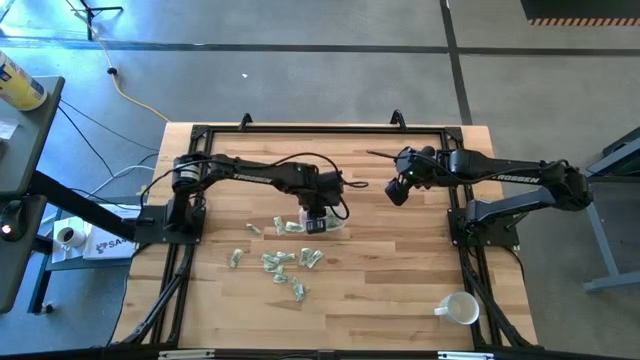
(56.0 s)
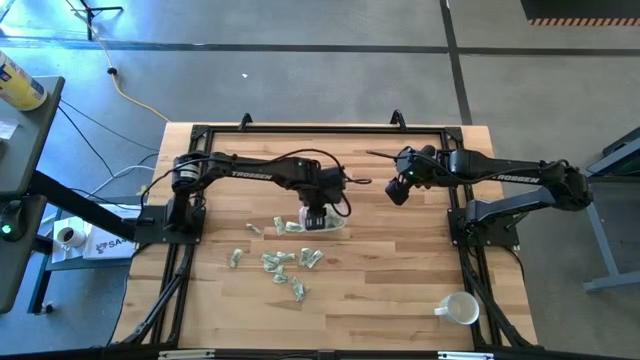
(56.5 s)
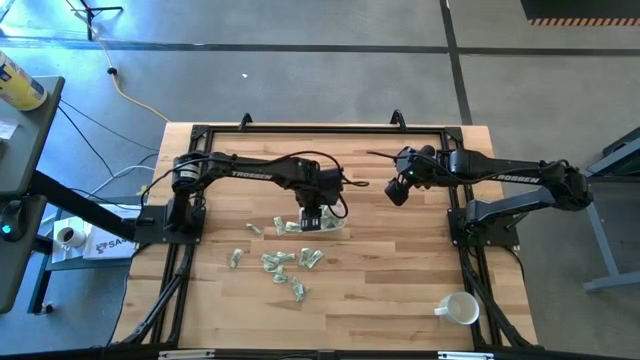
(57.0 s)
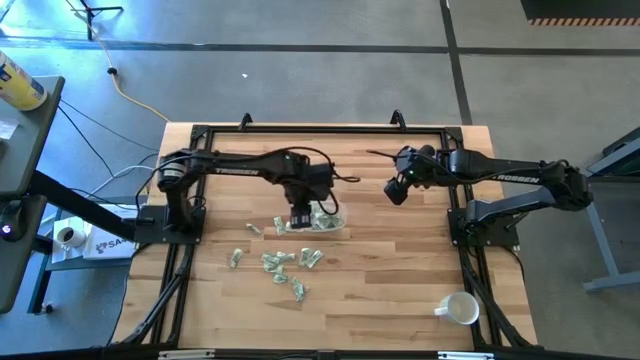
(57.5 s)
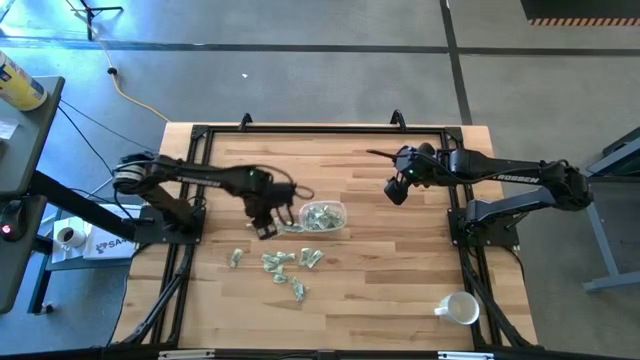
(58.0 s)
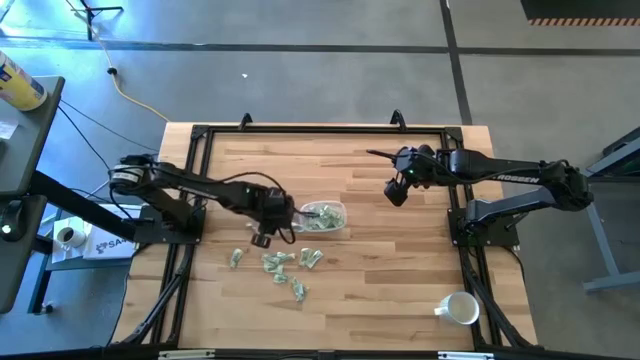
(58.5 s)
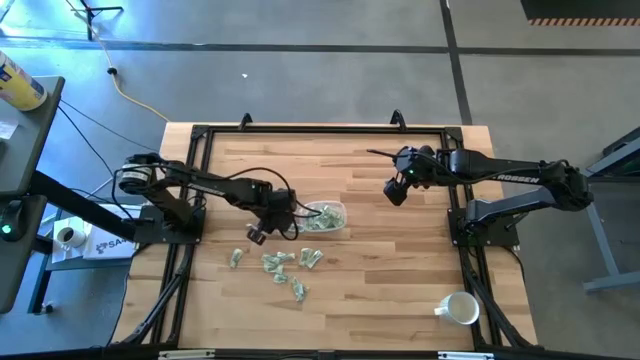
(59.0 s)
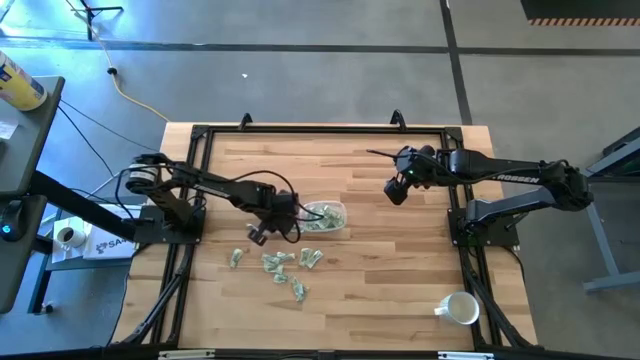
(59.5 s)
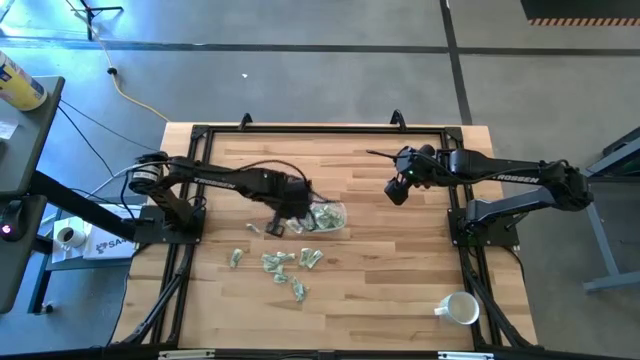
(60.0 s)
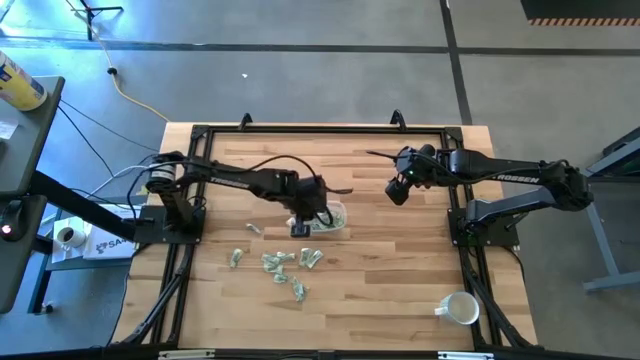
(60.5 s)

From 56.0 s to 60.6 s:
Task: Pick and place Stevia / Truvia into bins
Put the stevia packet into the transparent container

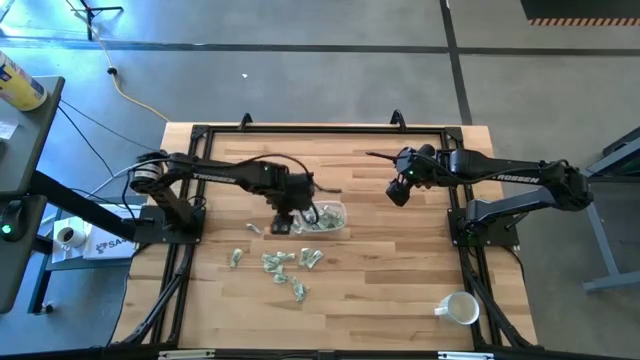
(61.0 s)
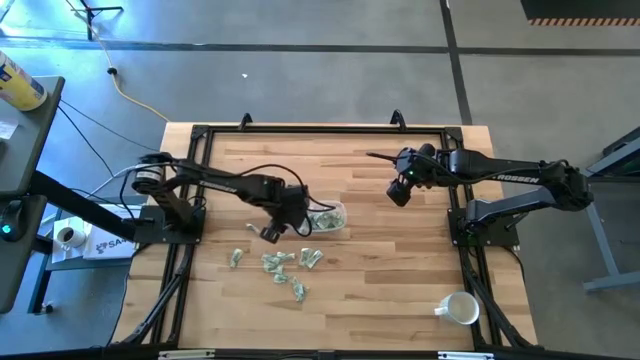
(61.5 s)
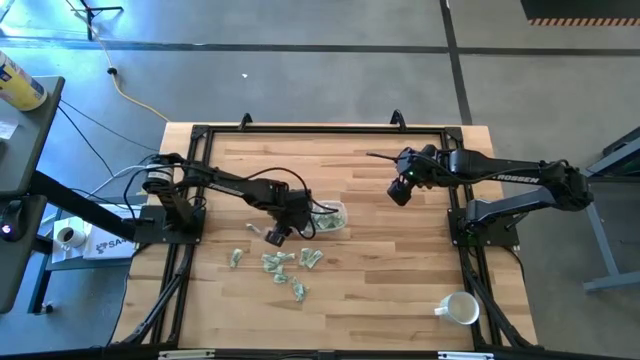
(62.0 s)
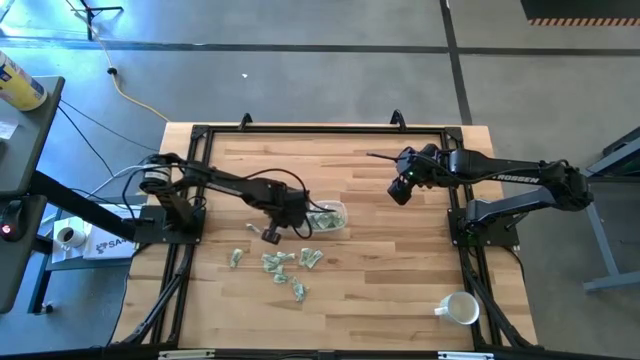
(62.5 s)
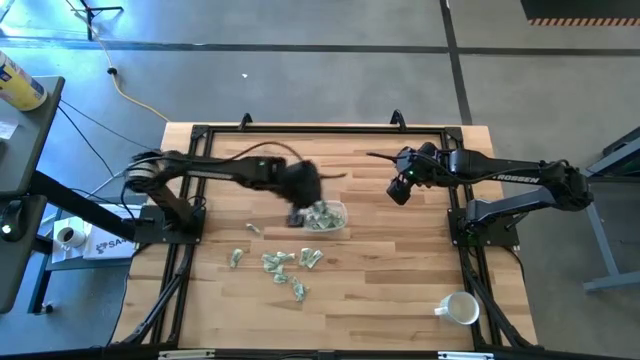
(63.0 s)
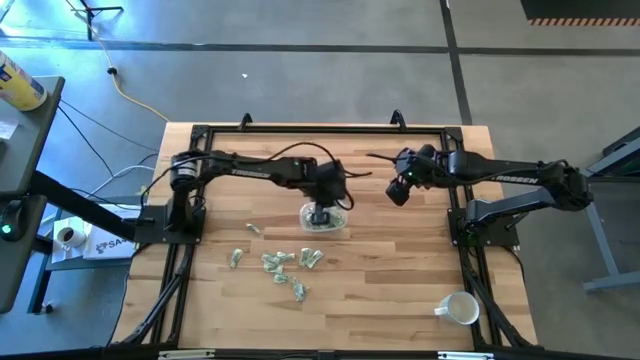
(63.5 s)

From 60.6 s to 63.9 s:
Put the stevia packet into the transparent container

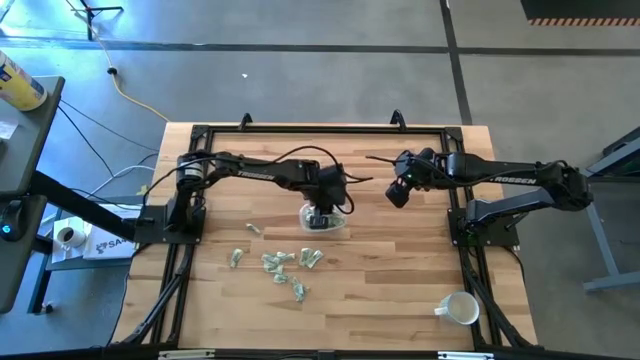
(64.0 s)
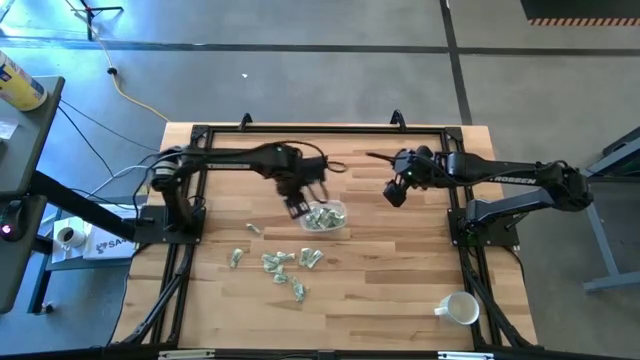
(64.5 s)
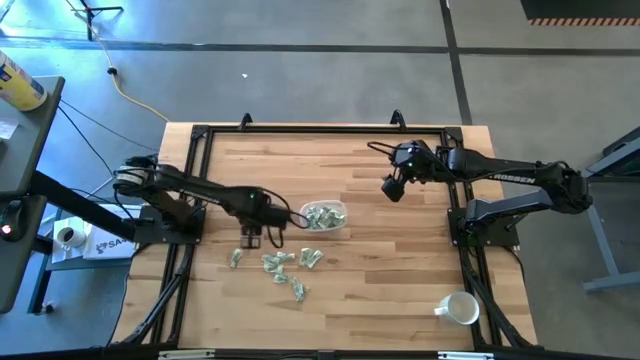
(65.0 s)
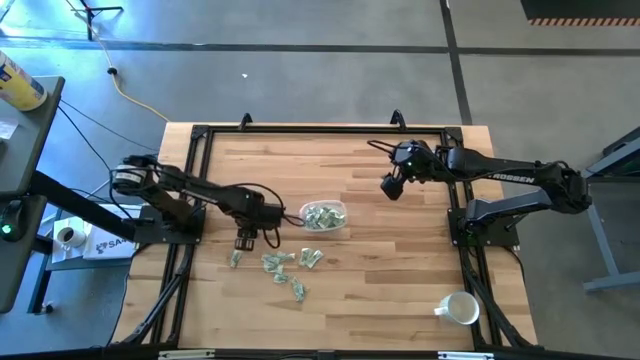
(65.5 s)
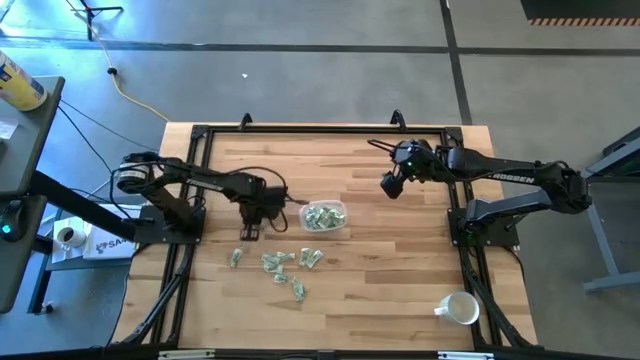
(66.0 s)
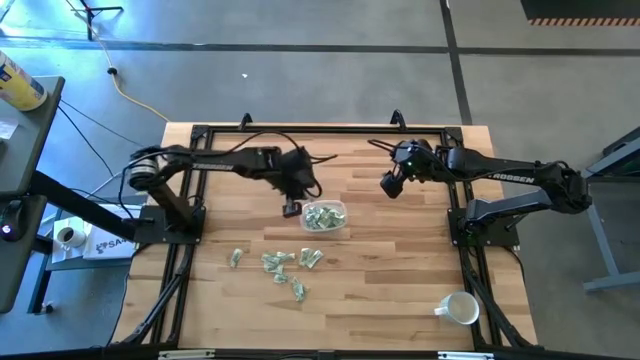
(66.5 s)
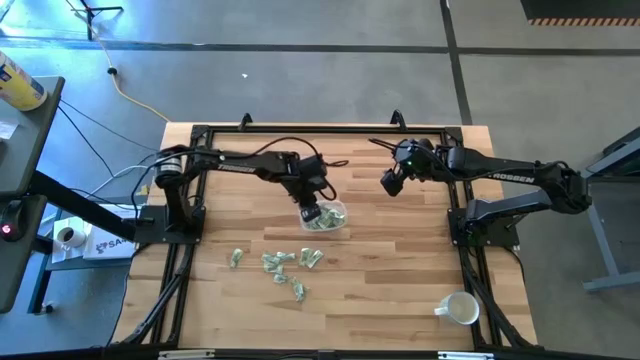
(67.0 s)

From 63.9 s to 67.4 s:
Put the stevia packet into the transparent container

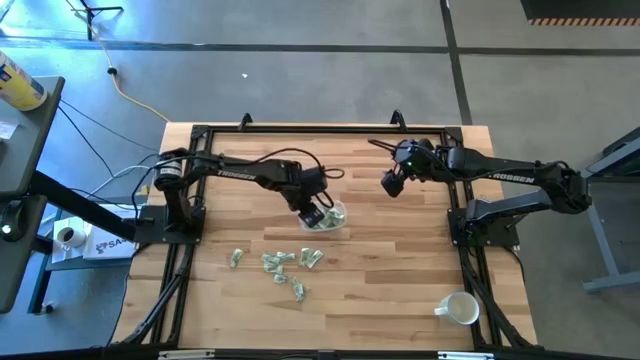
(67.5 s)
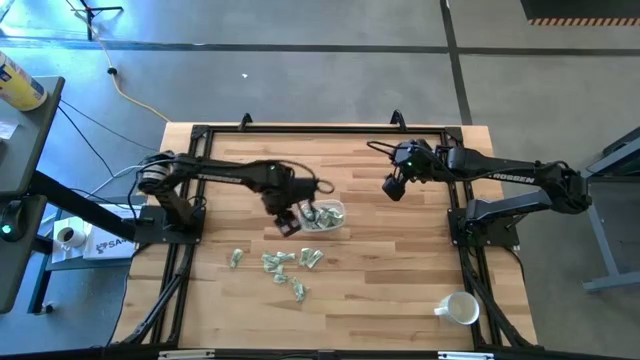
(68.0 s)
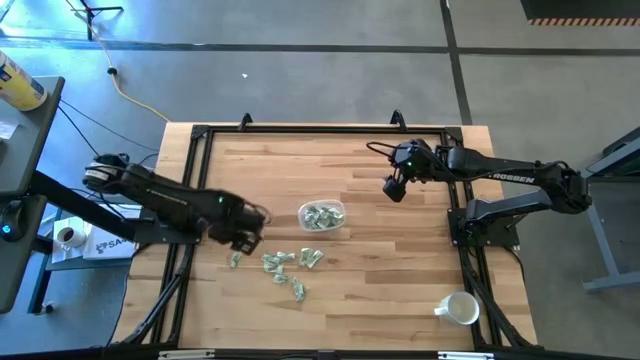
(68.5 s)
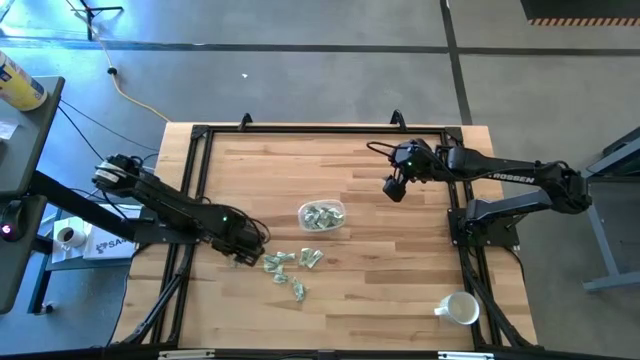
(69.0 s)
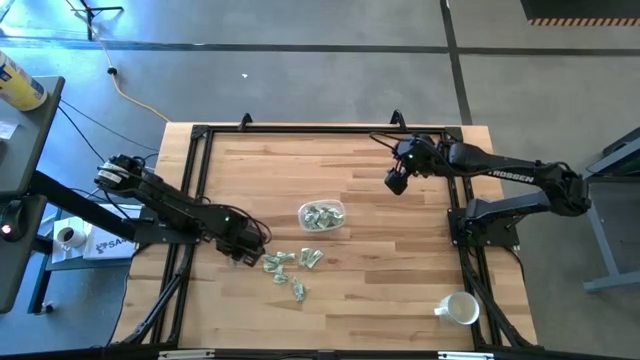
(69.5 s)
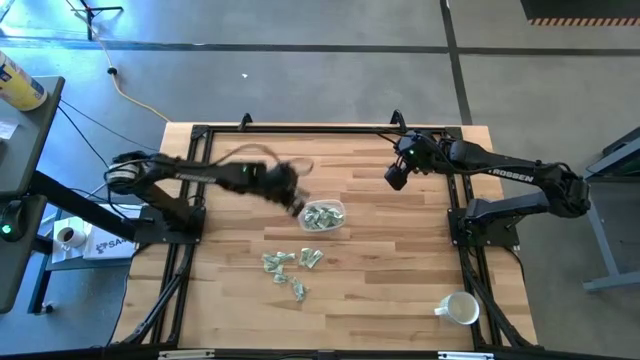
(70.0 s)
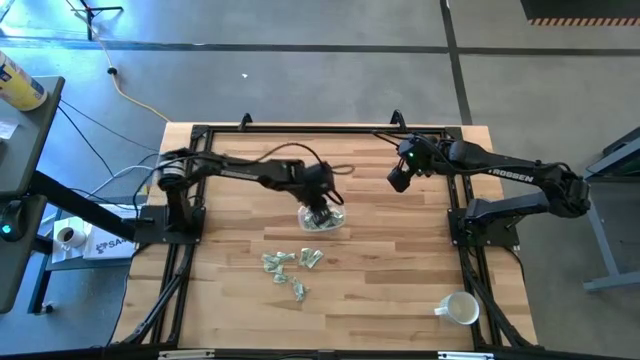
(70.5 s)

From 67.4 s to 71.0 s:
Put the stevia packet into the transparent container

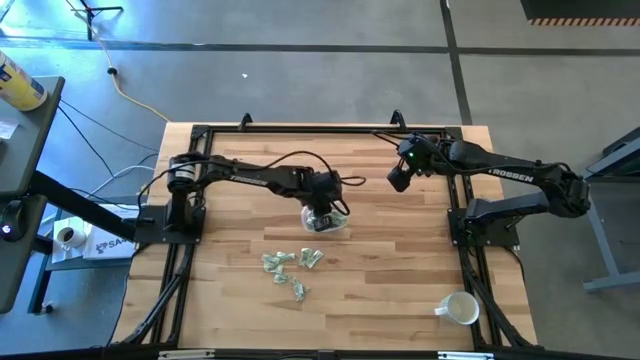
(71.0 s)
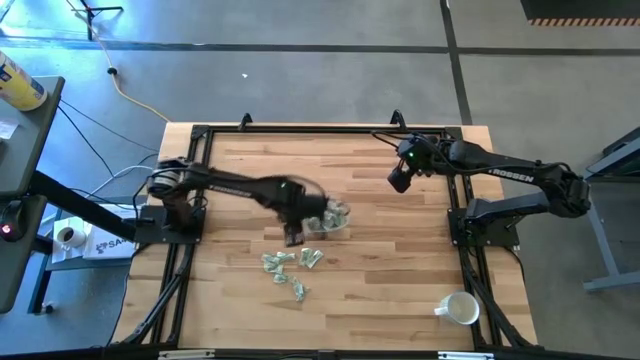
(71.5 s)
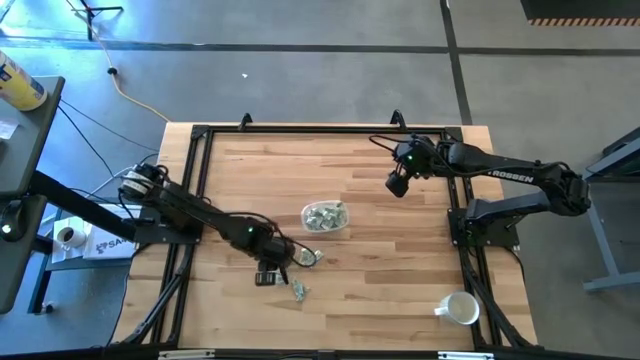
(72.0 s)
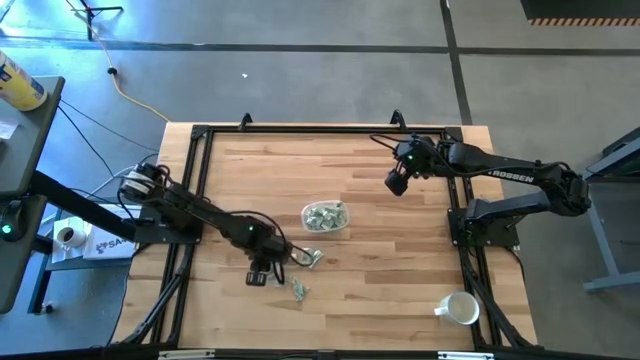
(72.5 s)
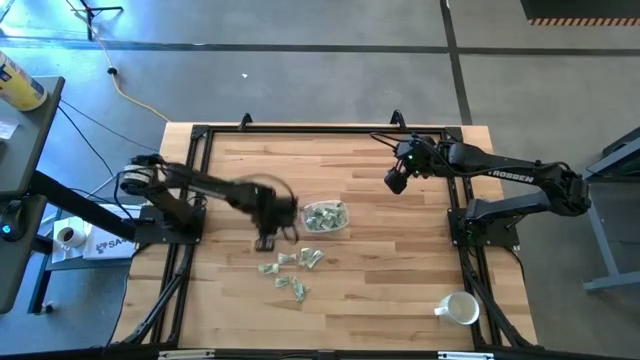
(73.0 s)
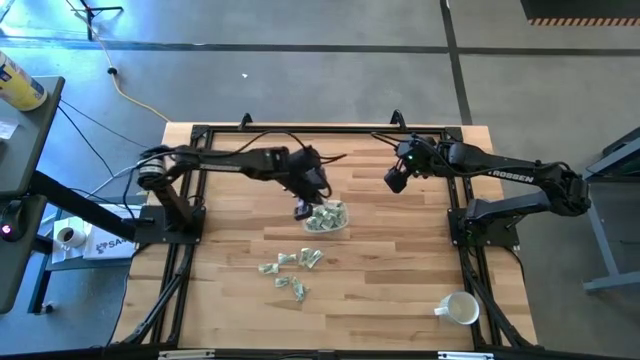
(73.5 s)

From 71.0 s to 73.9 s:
Put the stevia packet into the transparent container

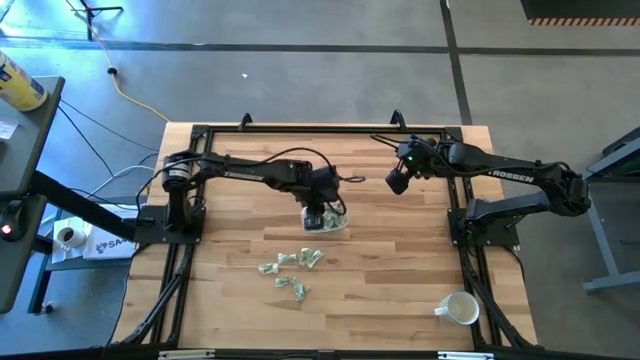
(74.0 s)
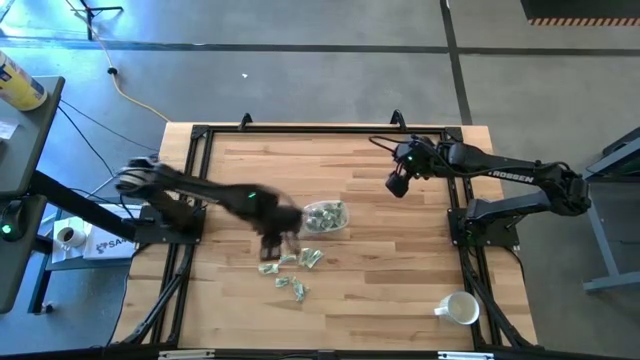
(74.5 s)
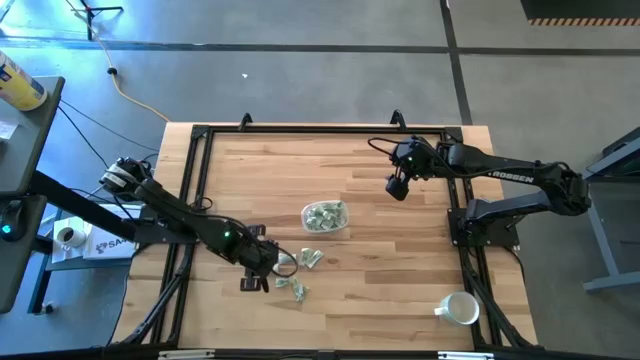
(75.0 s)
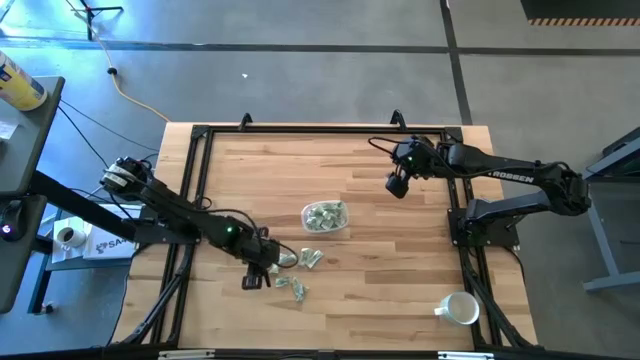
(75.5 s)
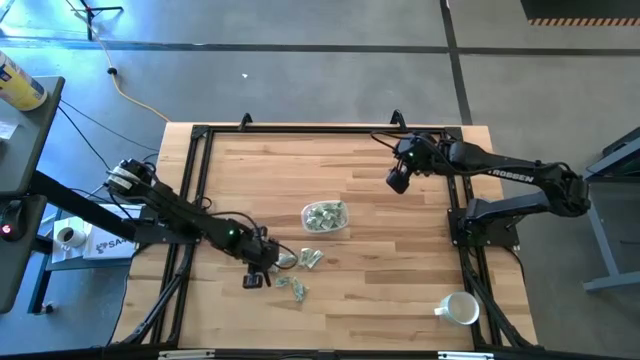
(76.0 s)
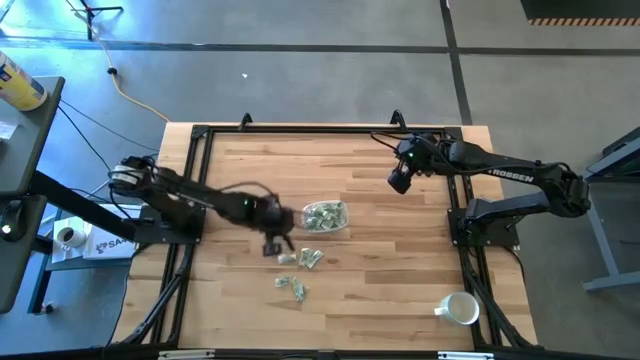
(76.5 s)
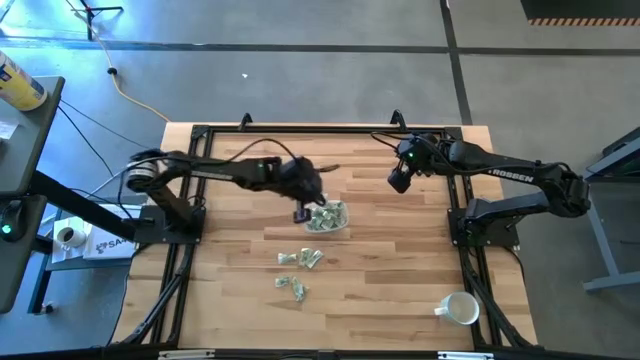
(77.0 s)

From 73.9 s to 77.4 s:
Put the stevia packet into the transparent container

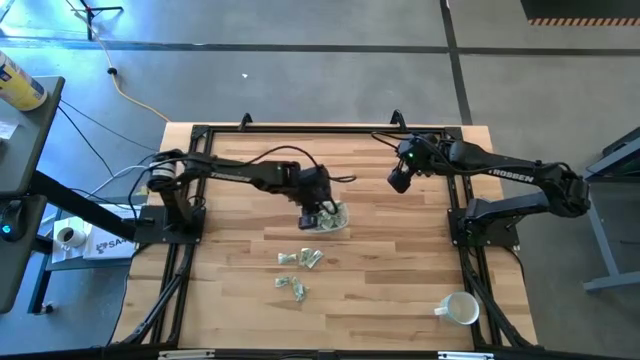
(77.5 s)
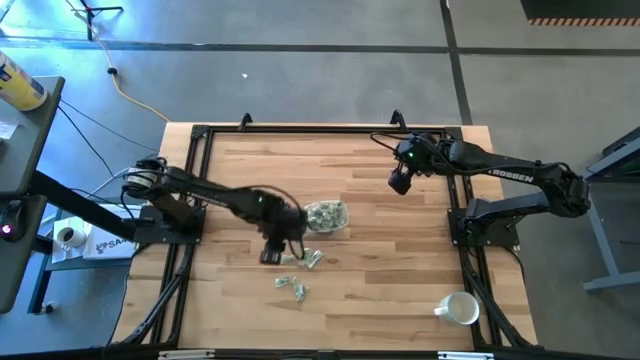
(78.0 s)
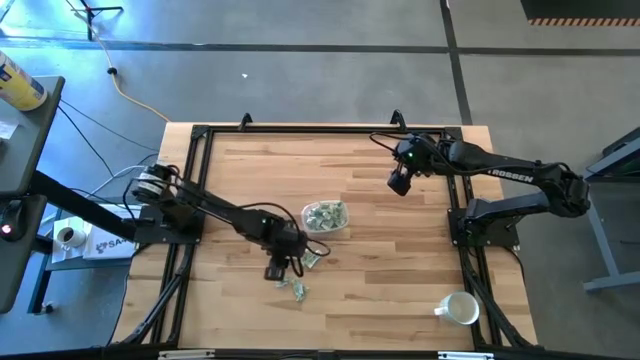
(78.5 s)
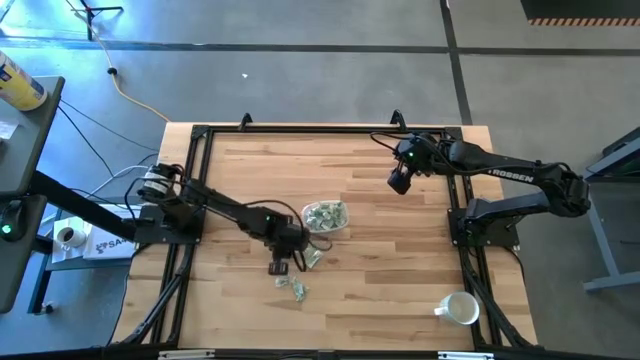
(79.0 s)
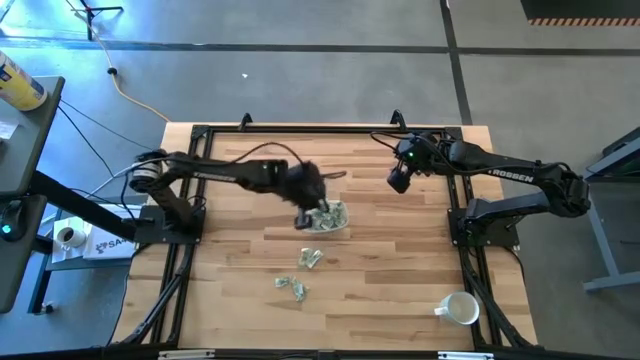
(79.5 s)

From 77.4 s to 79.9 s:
Put the stevia packet into the transparent container
